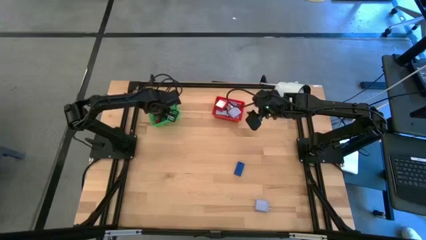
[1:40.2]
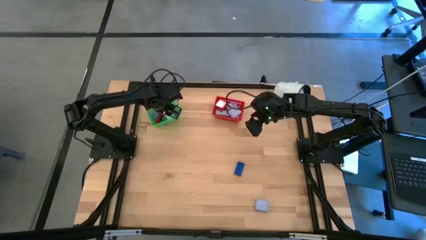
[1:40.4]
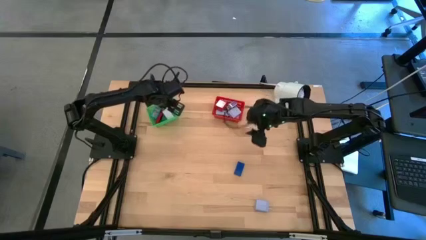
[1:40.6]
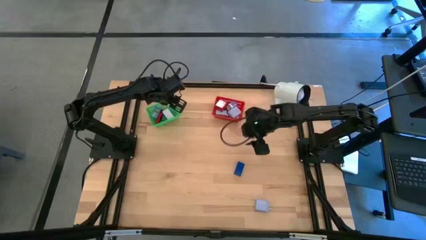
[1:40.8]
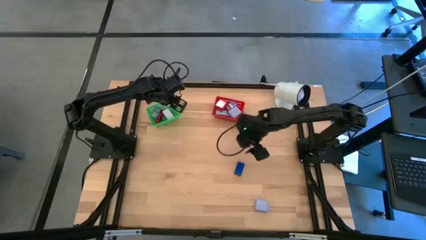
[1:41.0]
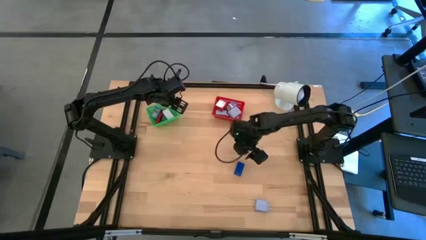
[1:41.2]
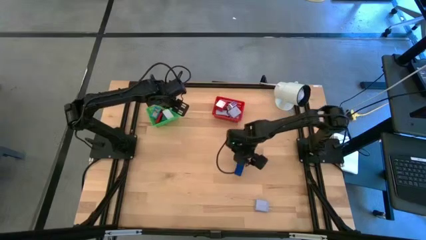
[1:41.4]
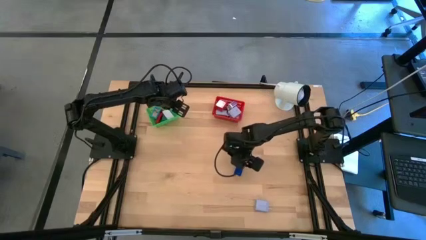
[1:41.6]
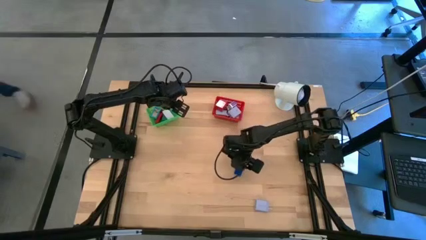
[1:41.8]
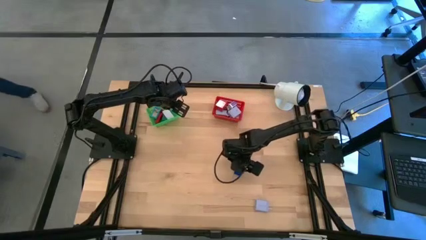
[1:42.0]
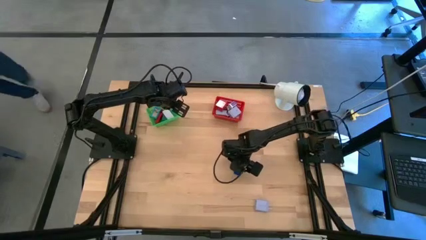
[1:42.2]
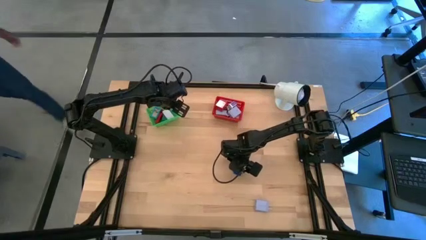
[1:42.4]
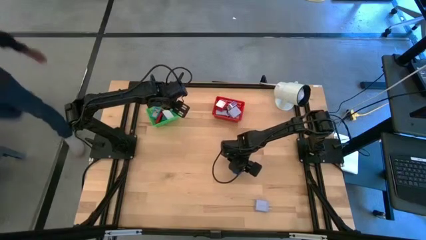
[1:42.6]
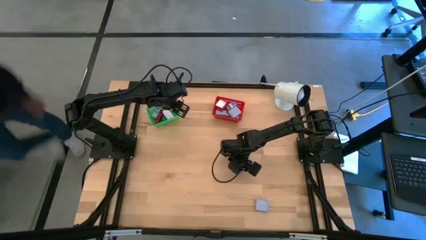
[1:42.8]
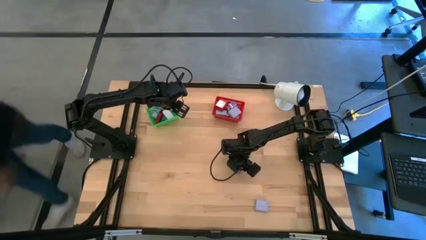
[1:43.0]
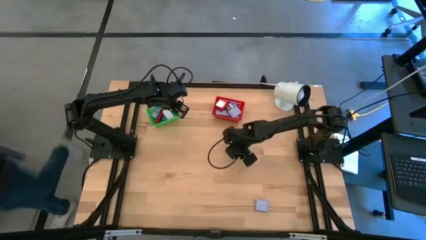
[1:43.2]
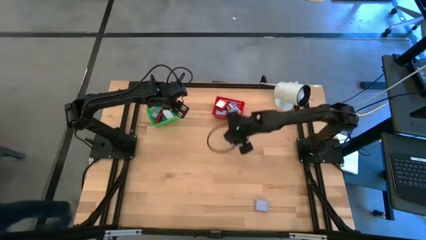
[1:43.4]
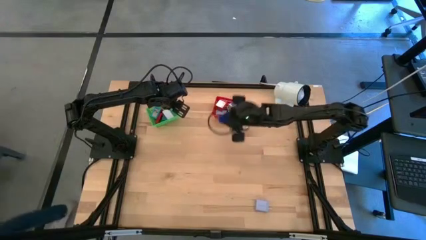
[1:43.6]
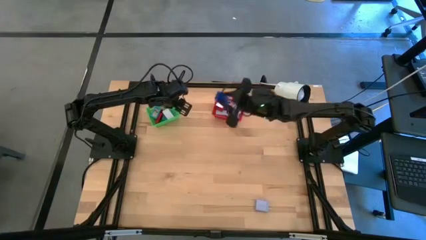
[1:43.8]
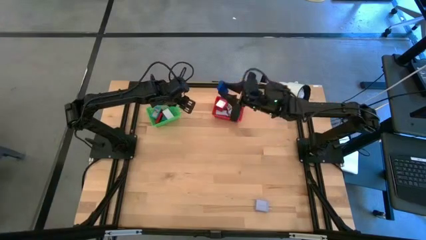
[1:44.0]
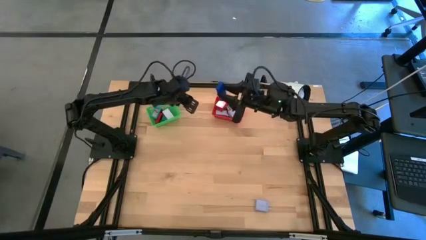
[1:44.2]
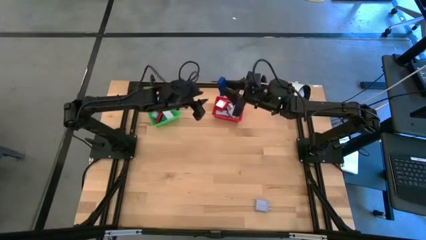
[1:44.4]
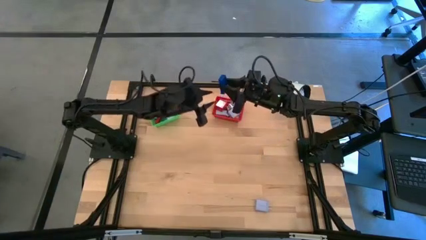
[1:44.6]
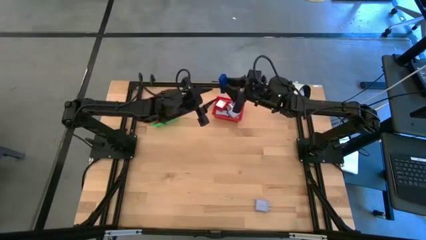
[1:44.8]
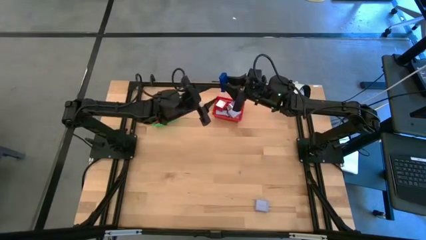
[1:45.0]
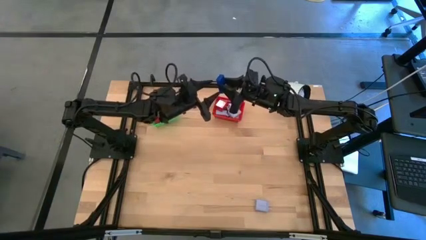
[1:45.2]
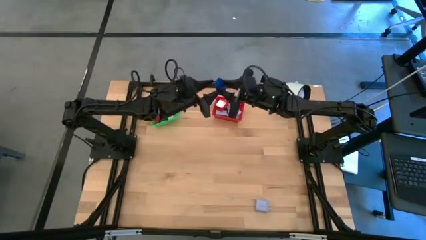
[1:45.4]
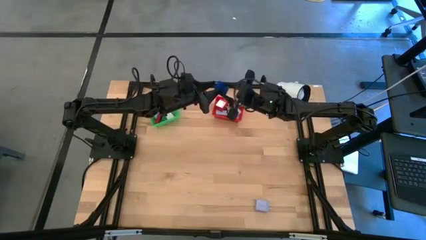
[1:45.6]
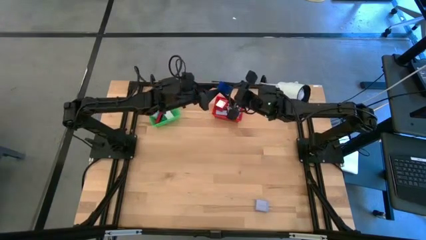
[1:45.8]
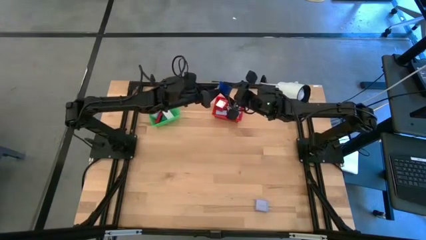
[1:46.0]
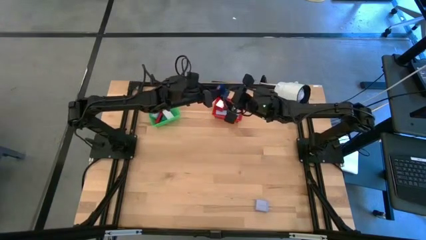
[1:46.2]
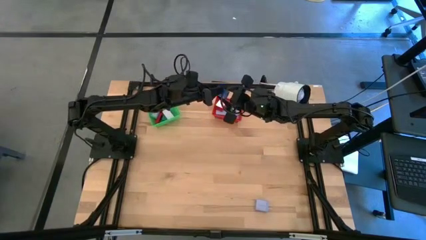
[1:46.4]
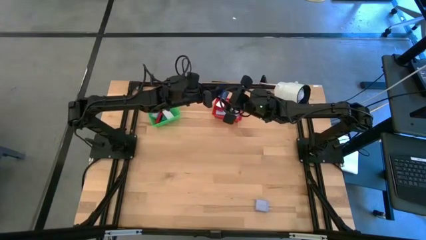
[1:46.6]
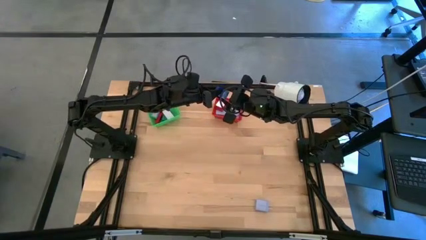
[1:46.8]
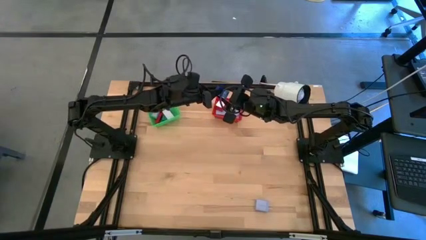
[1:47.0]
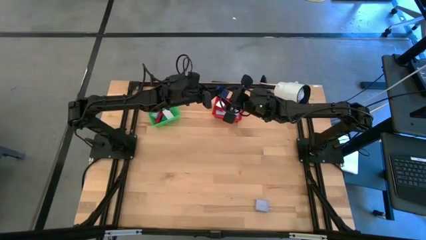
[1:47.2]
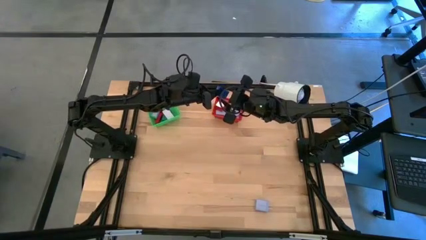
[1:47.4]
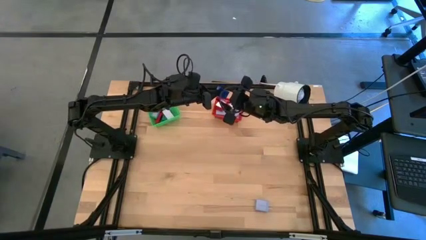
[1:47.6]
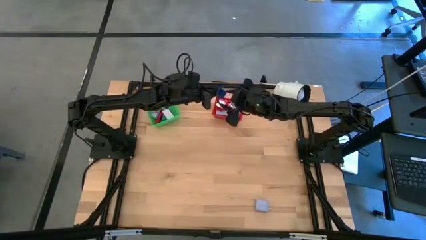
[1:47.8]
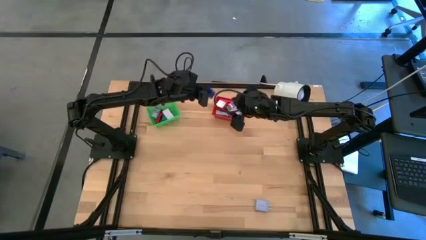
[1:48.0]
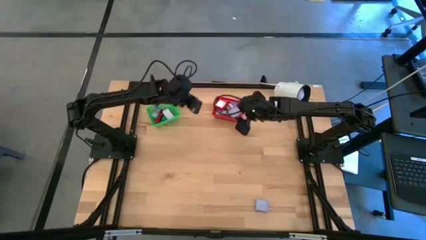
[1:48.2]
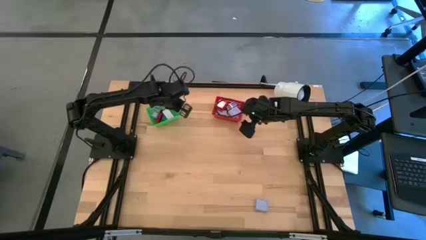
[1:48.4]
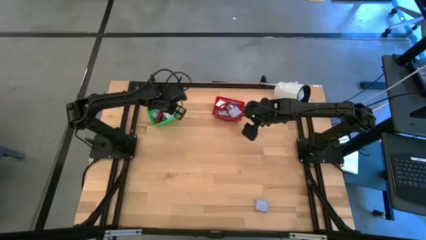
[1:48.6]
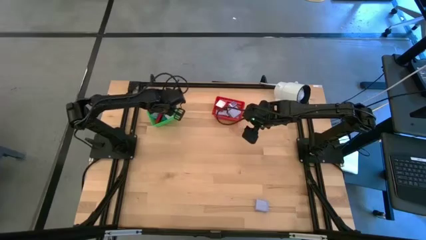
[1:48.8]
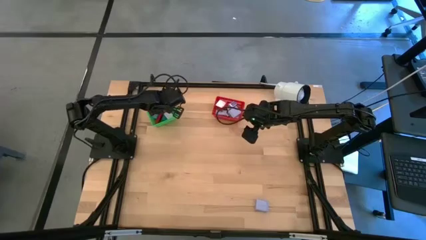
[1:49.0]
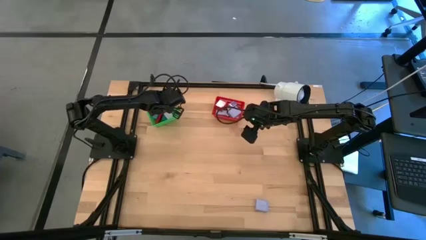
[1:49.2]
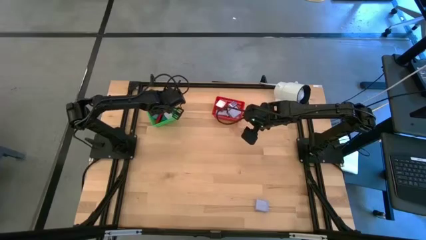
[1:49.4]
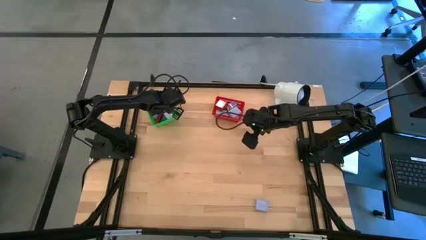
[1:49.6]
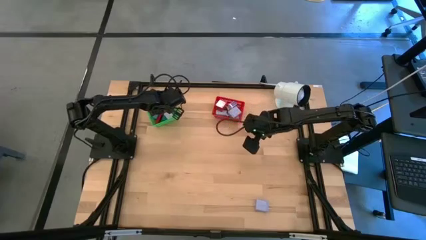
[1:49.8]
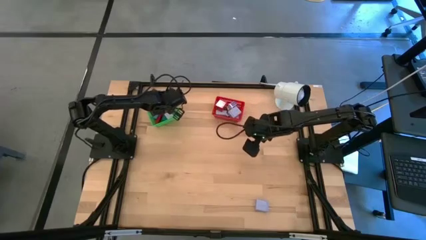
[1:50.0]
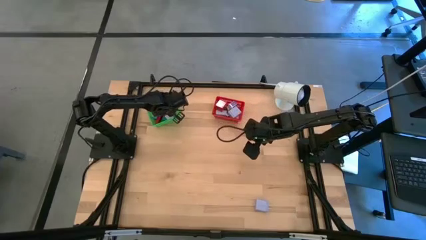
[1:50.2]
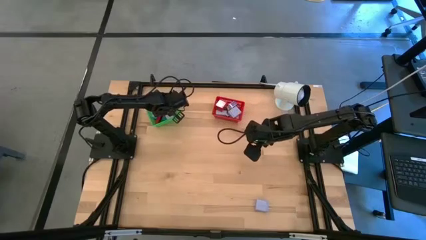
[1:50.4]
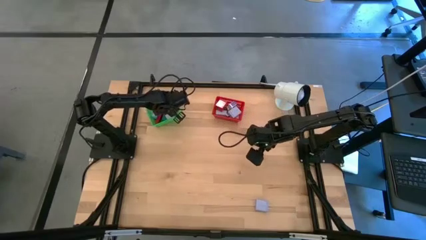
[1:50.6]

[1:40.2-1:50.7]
Task: Pick & Place Office items
Put the dark blue digital clock into the green bin

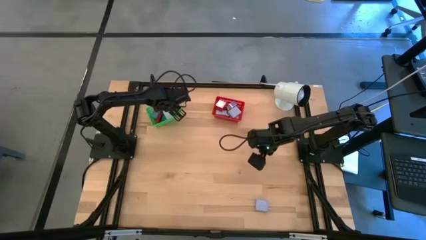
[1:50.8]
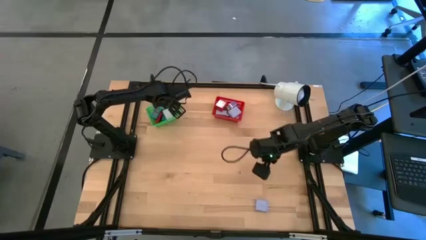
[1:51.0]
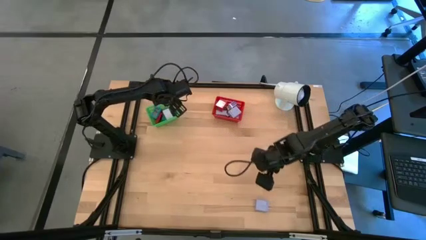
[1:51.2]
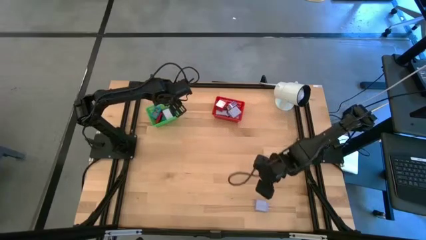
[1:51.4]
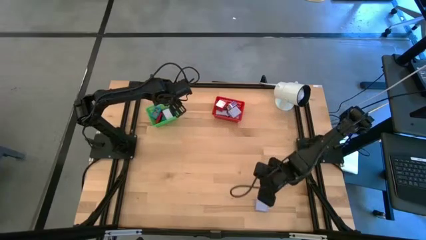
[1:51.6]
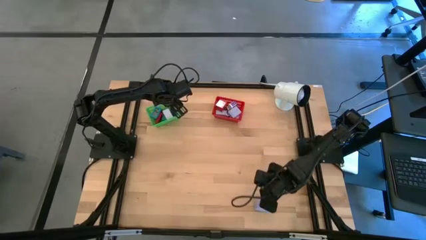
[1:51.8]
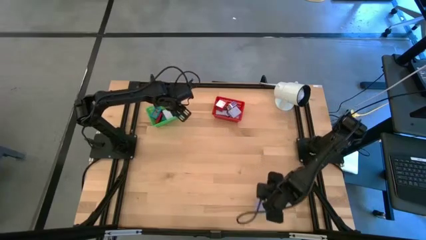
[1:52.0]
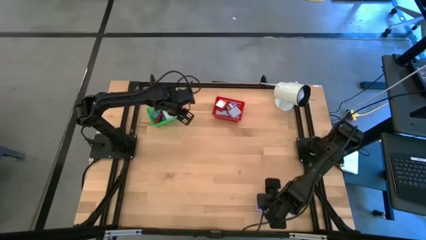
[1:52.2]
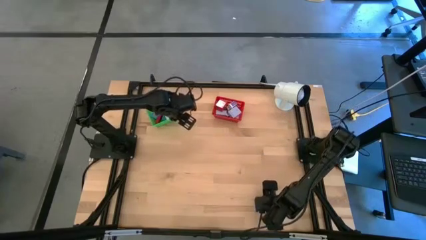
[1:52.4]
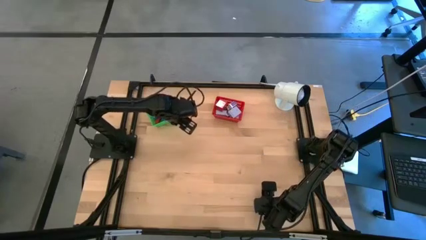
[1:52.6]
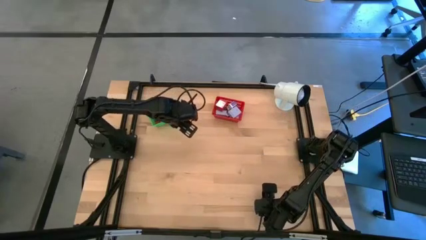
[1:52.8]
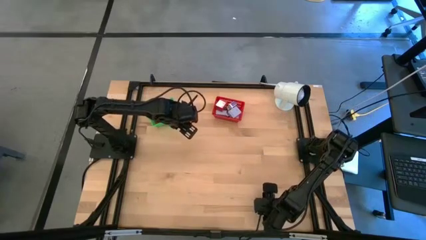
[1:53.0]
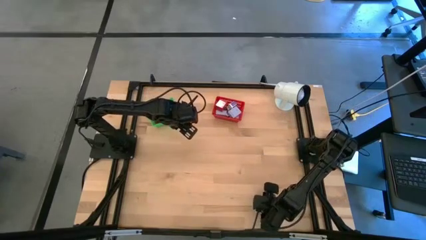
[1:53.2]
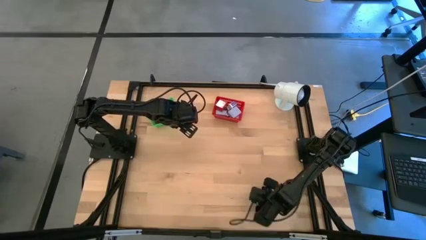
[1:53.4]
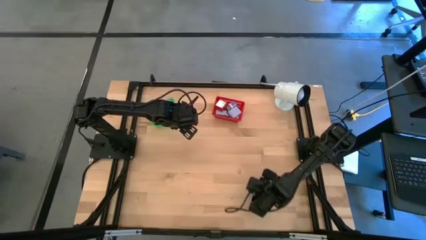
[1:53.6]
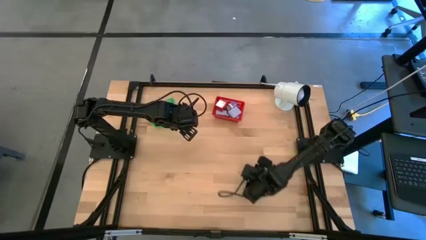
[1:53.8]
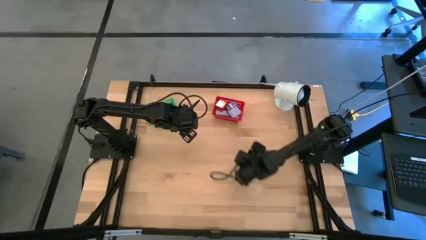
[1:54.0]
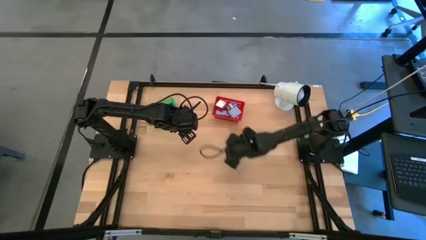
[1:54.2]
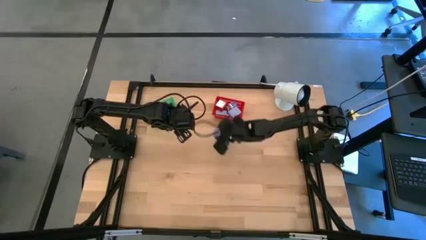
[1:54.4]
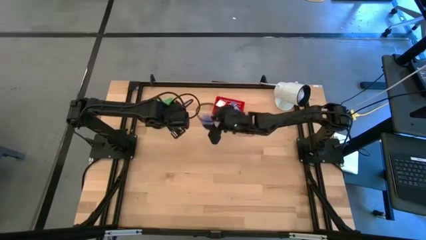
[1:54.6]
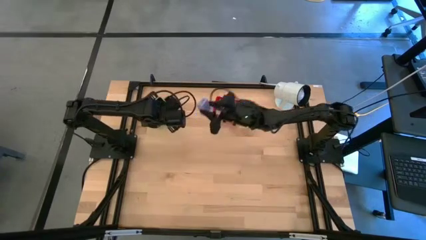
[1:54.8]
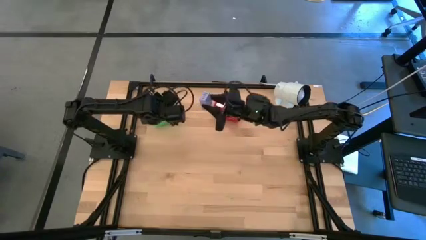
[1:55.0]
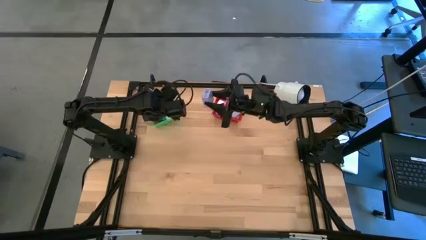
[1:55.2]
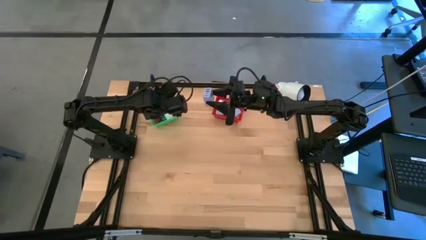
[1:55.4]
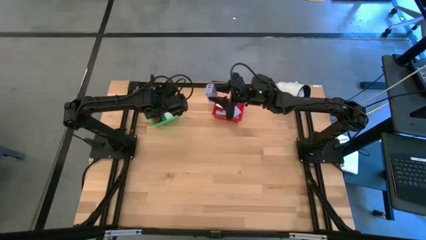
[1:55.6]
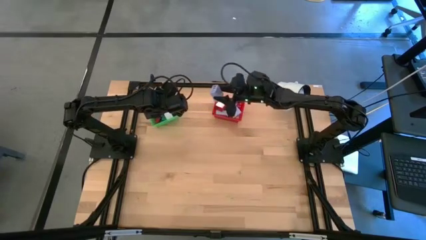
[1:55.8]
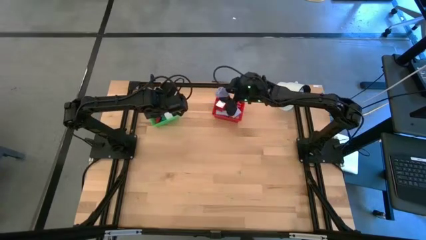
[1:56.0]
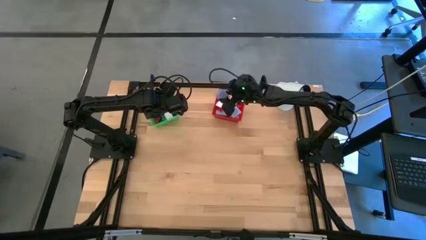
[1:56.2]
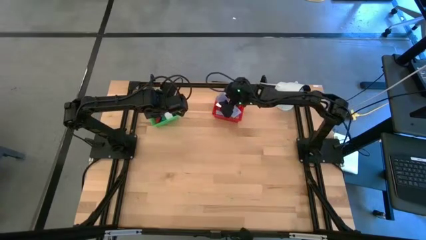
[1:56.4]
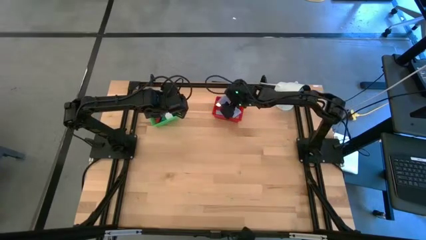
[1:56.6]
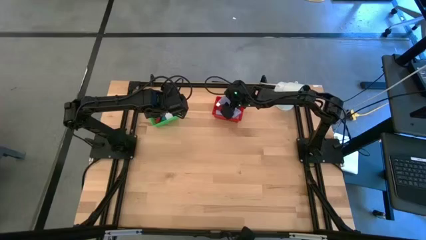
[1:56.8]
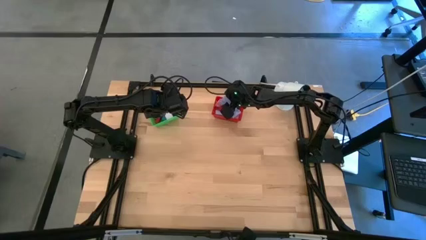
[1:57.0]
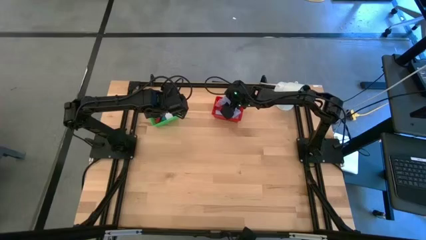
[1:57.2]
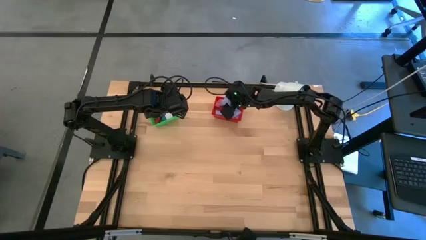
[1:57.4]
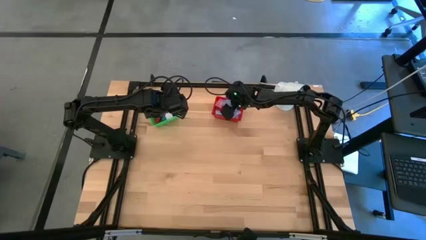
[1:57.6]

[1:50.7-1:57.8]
Put the purple charger adapter into the red bin
